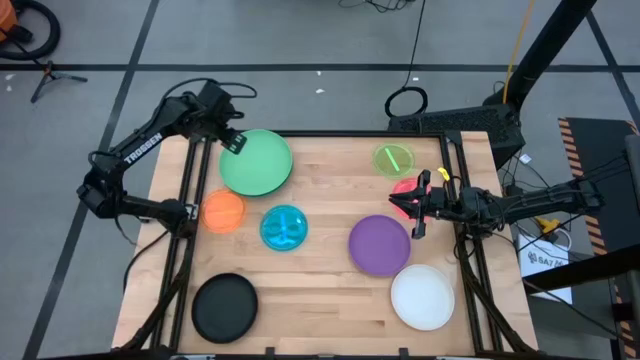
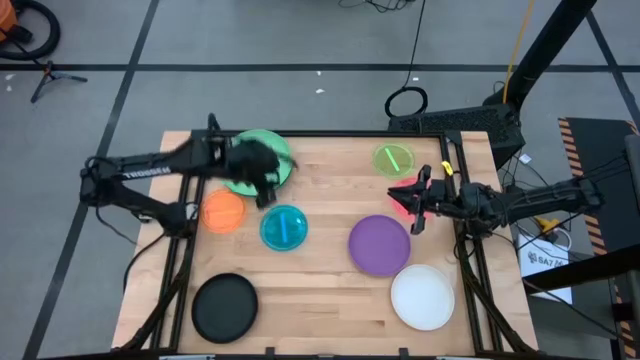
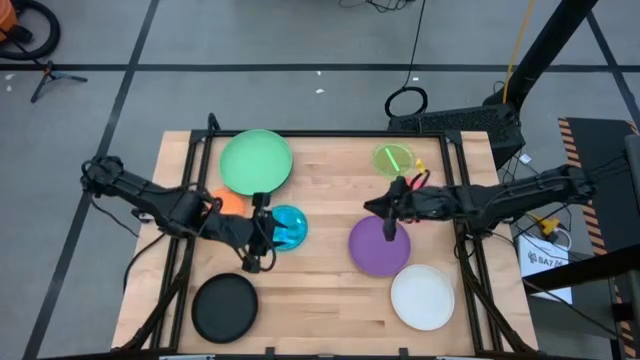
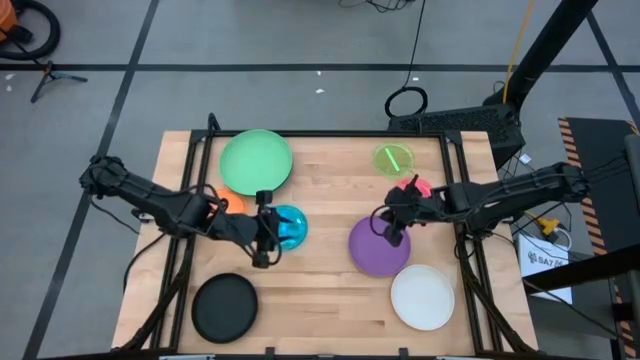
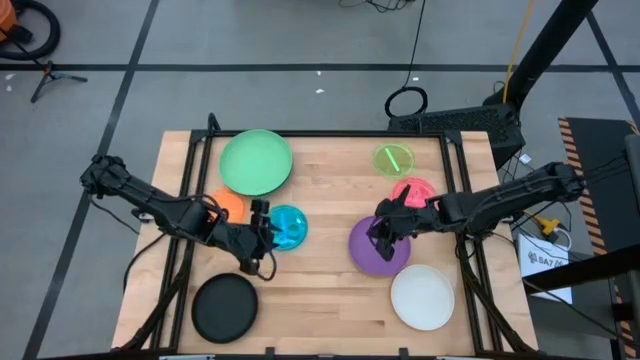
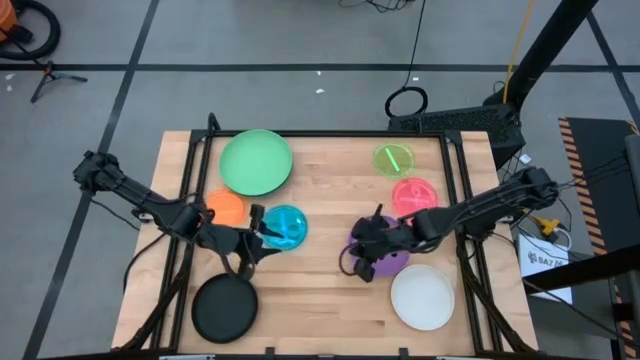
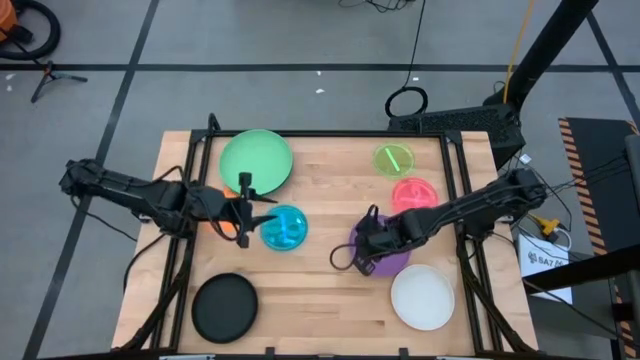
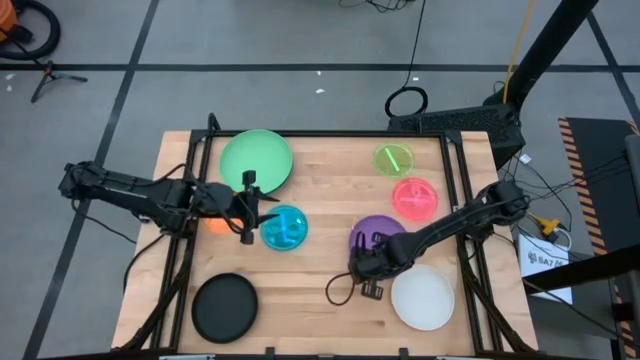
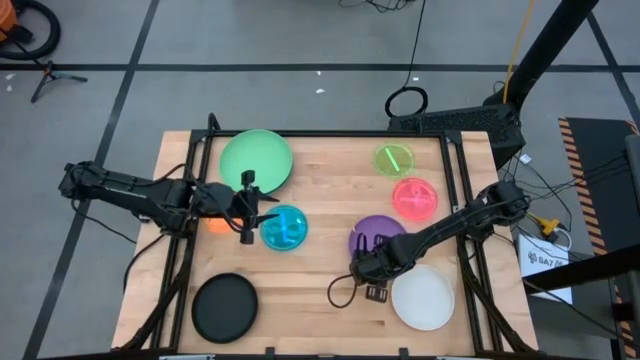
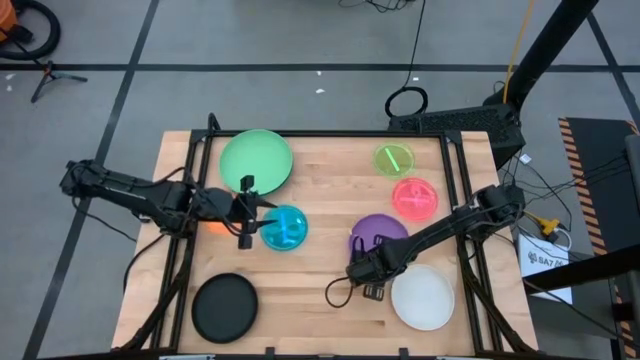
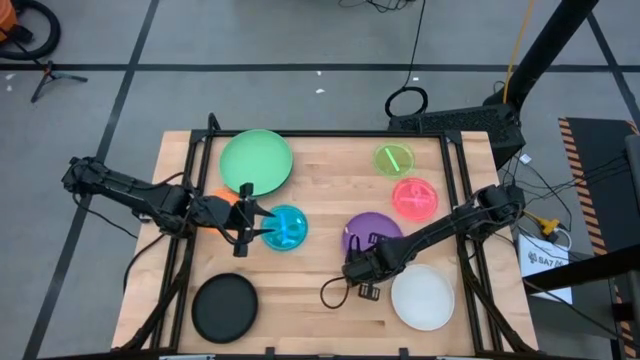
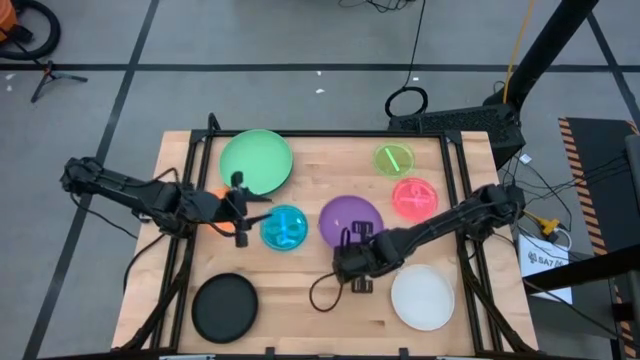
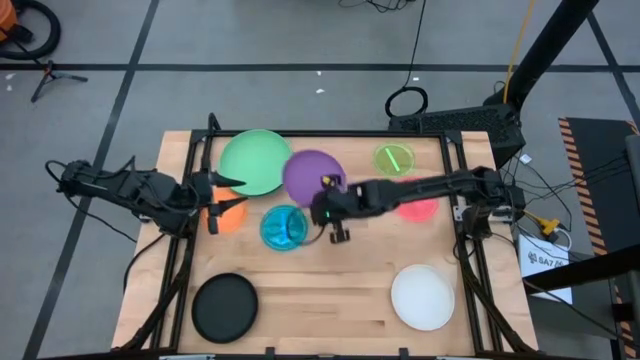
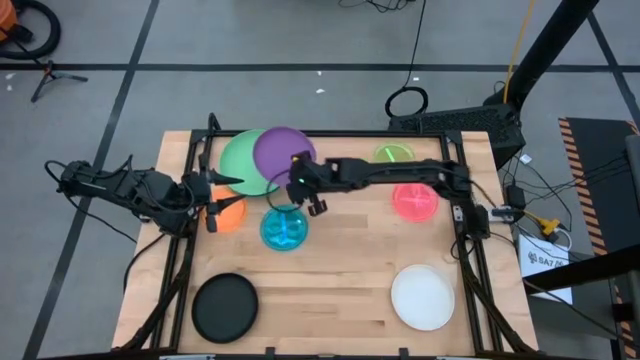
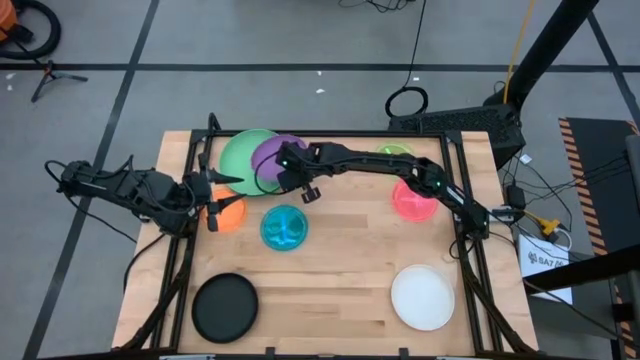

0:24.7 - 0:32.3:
Task: Stack plastic plates
Stack the medium purple plate on top of the large green plate

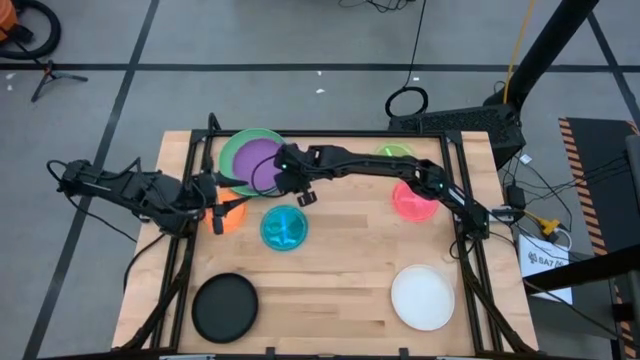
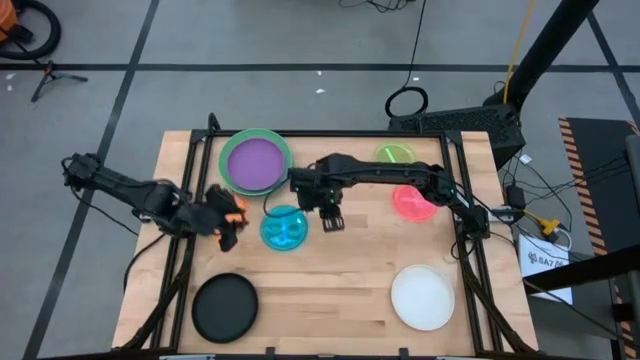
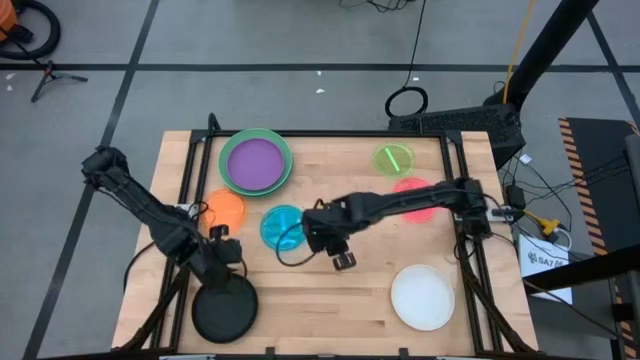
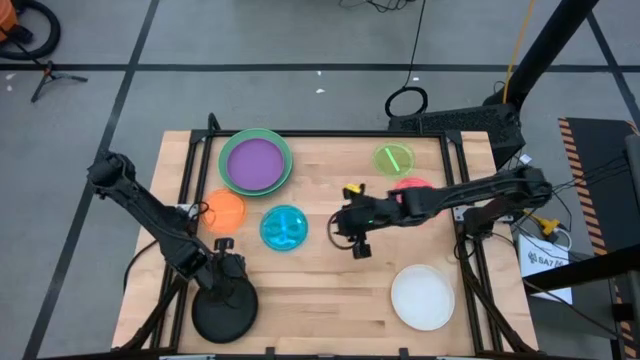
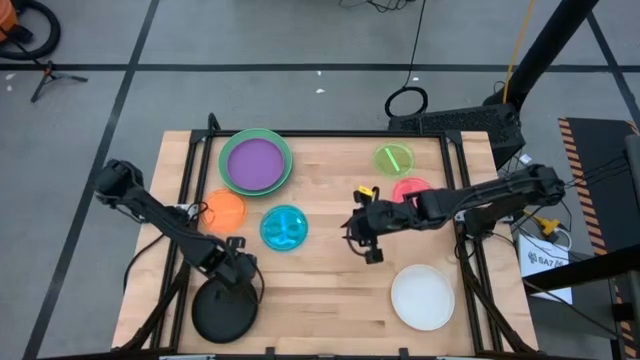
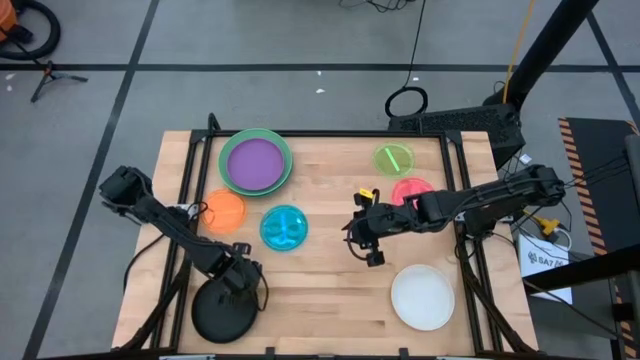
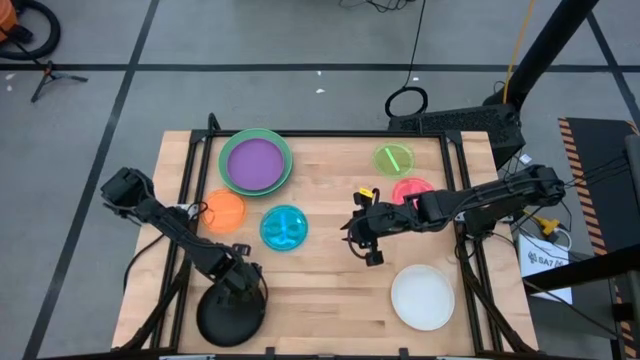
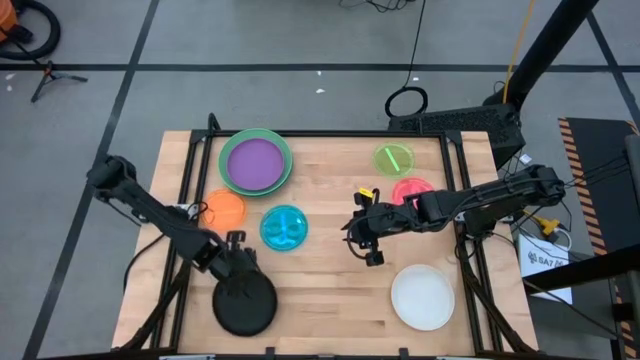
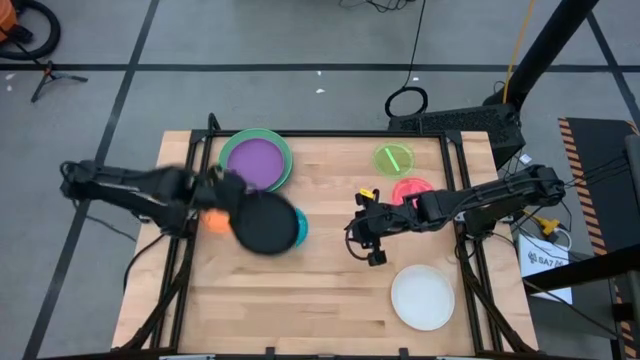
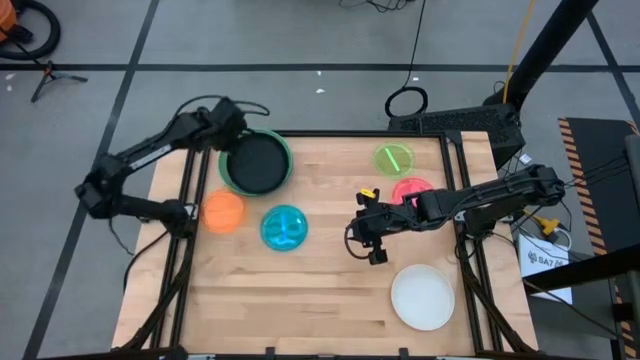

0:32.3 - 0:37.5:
Stack the medium black plate on top of the medium purple plate

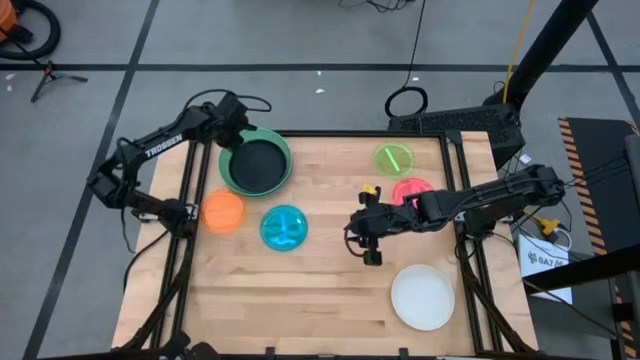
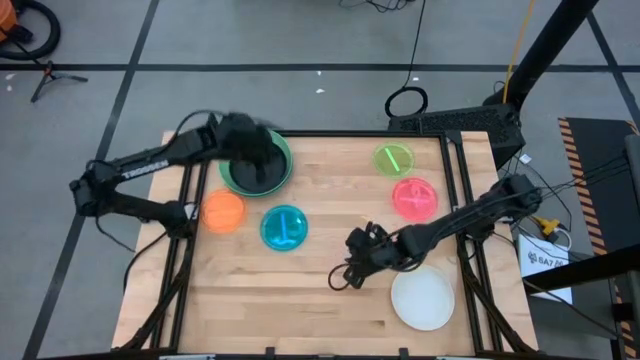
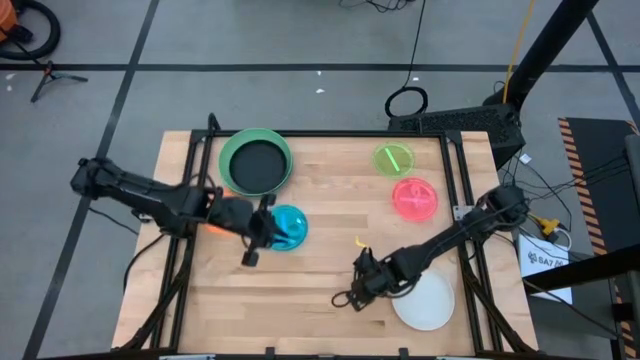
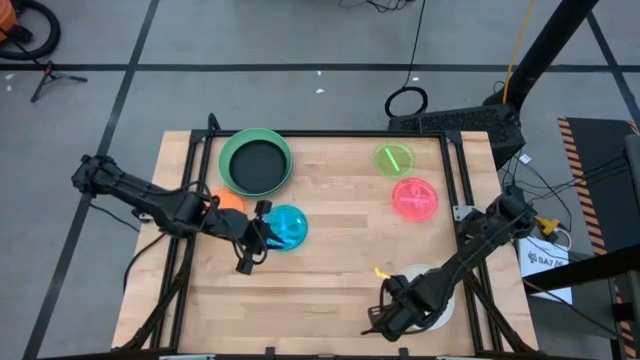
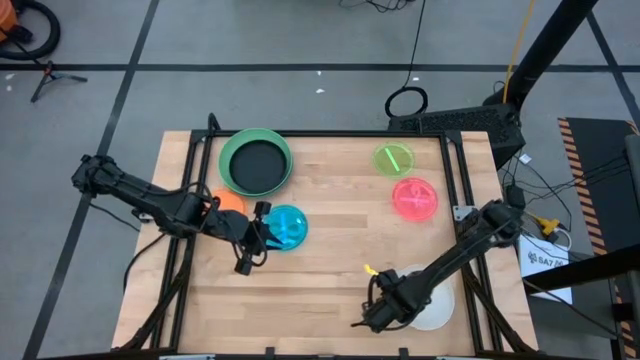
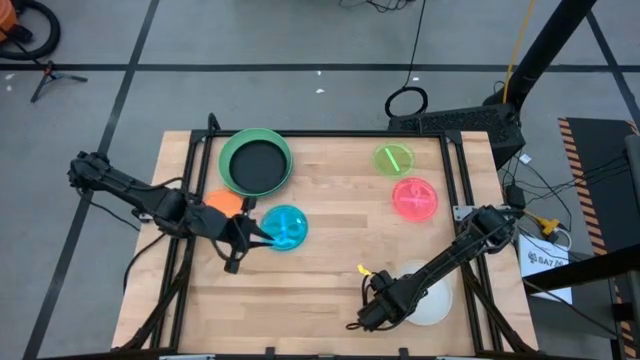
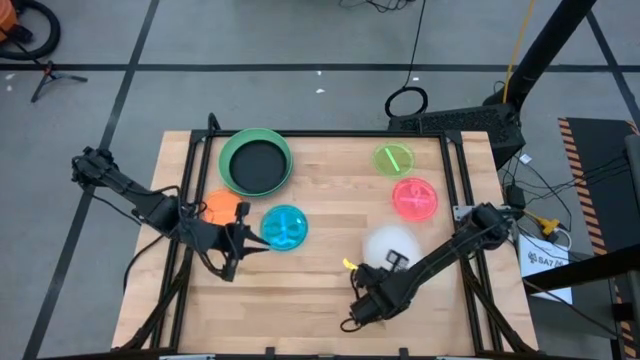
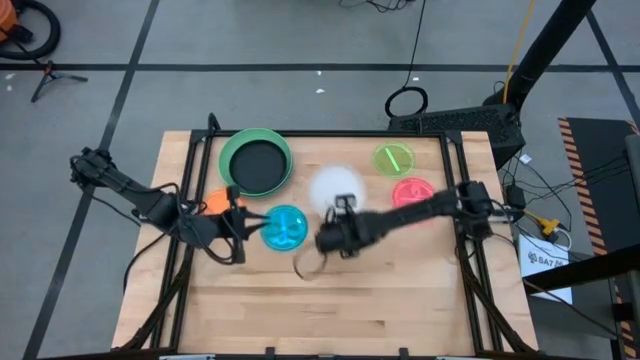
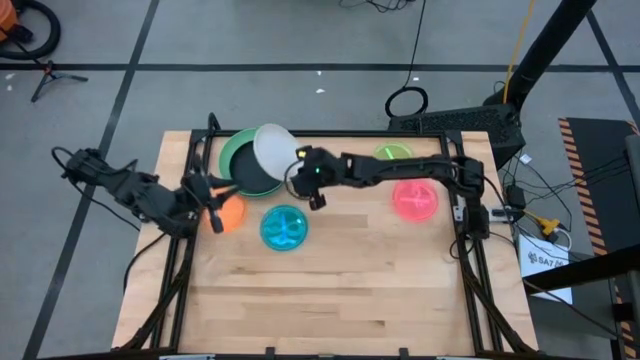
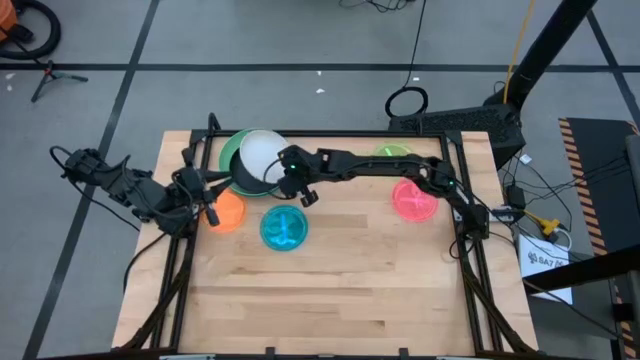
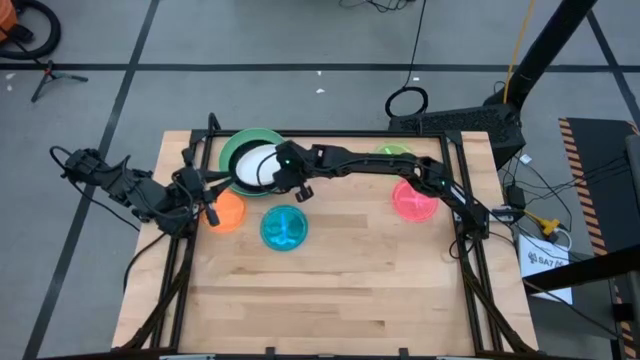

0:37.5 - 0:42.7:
Stack the medium white plate on top of the medium black plate

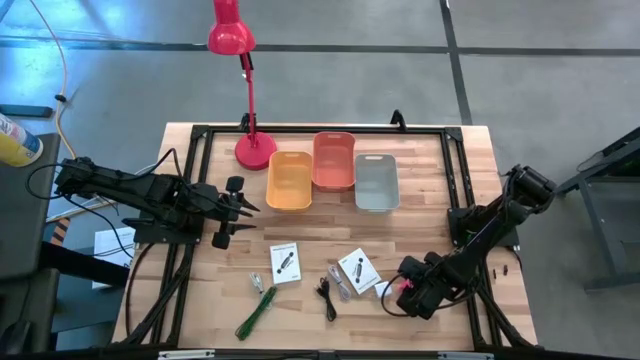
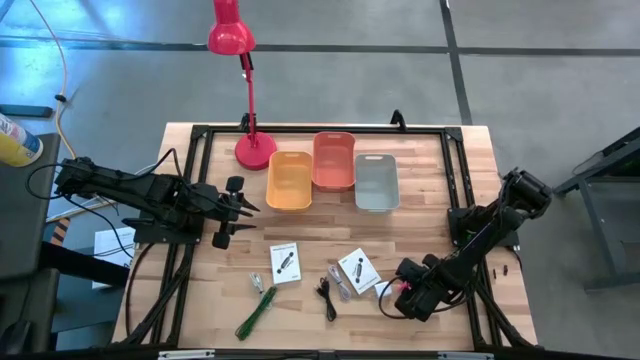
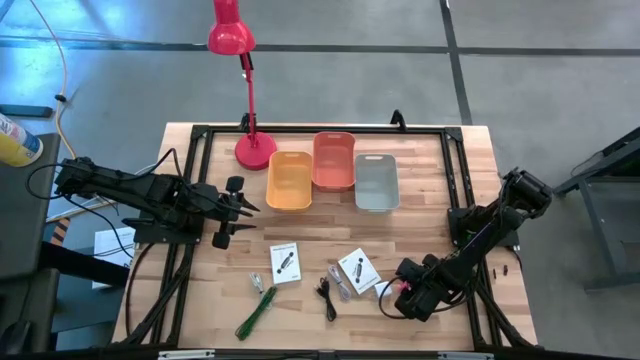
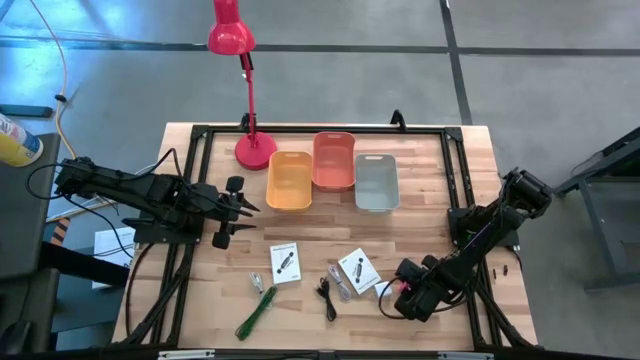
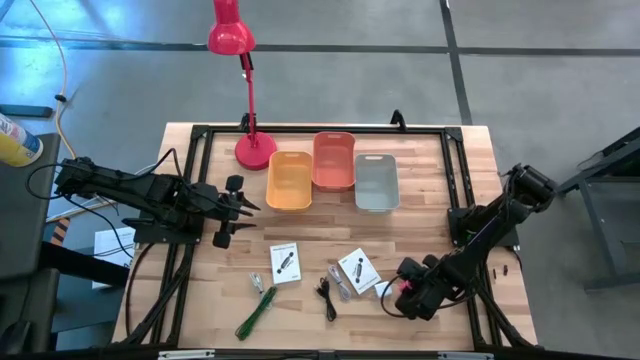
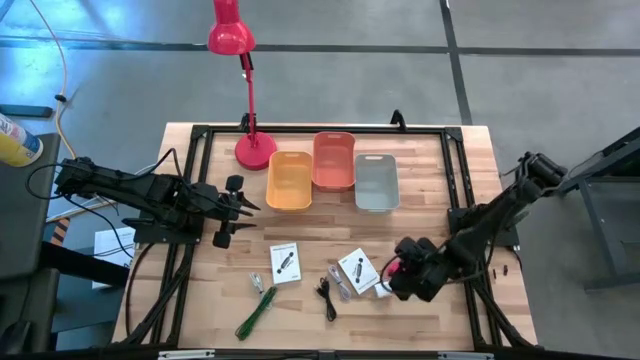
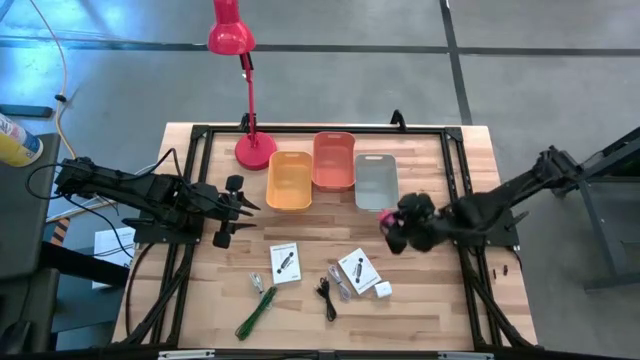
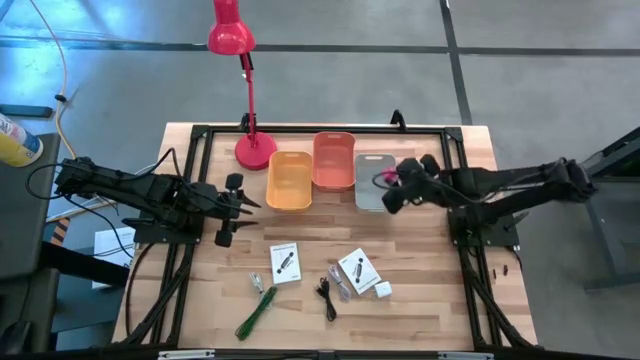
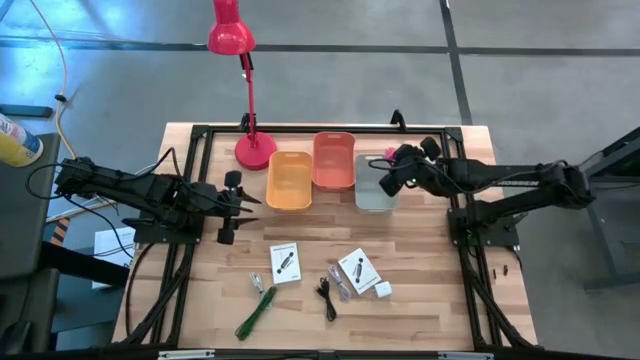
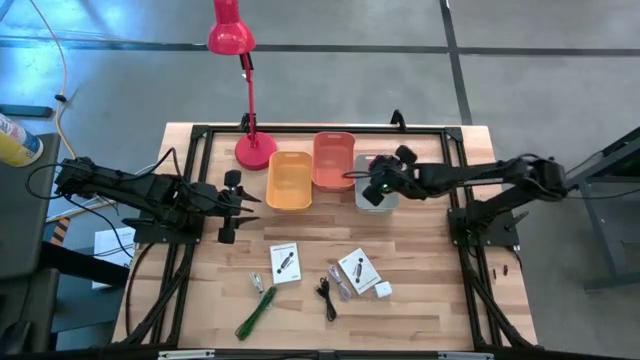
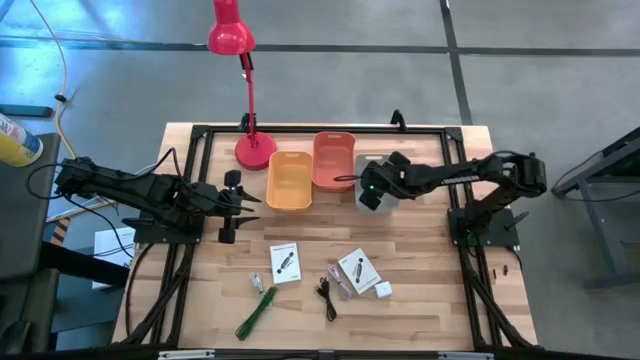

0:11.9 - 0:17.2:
Task: Pick and place items into bin
Put the pink charger adaptor into the gray bin
